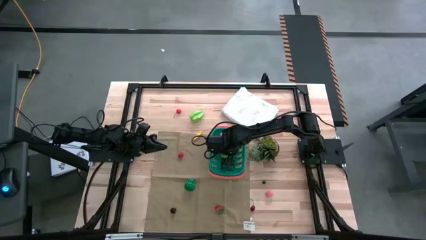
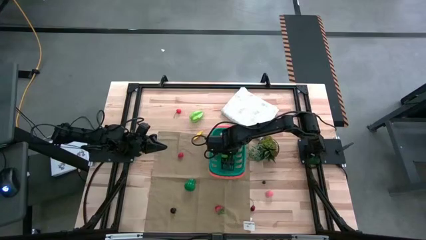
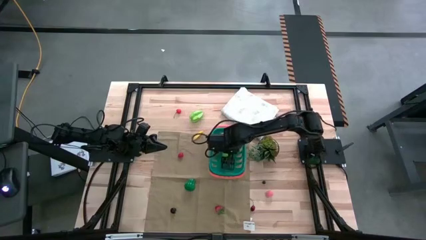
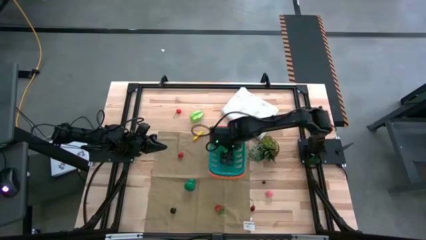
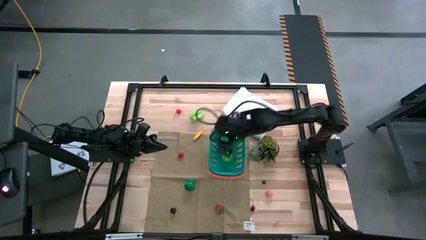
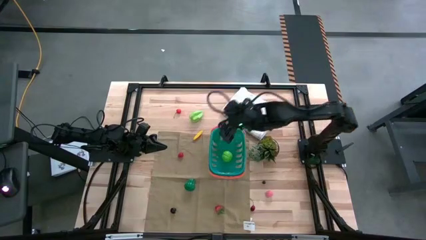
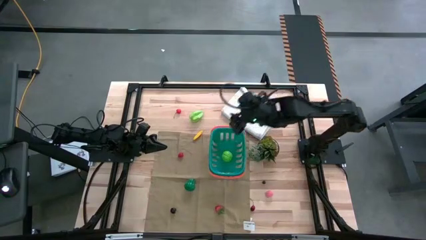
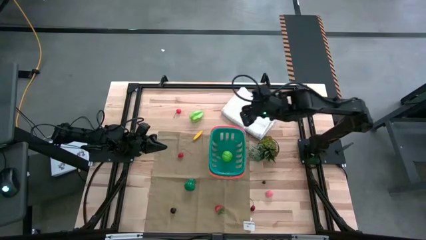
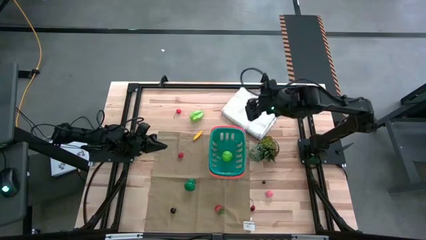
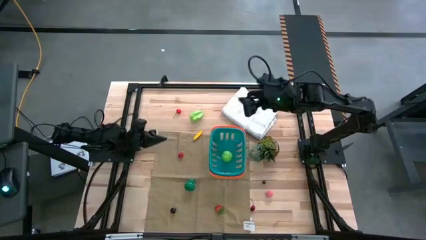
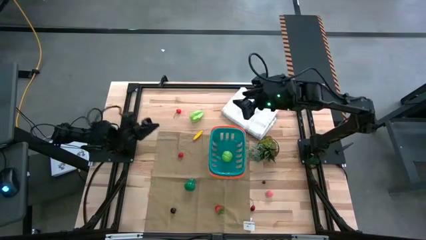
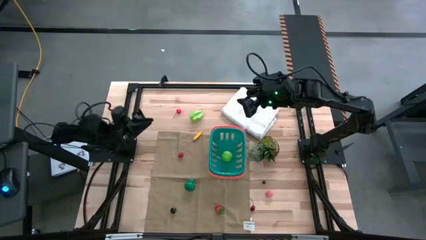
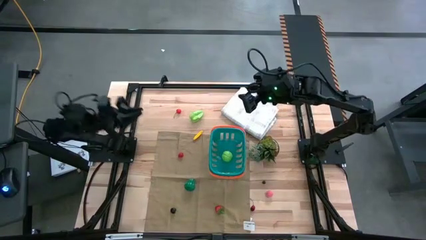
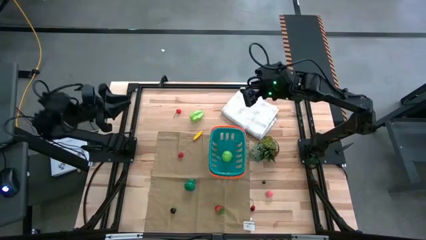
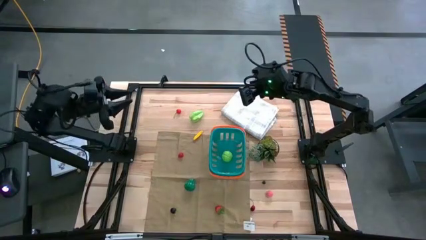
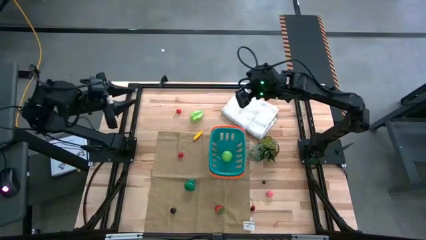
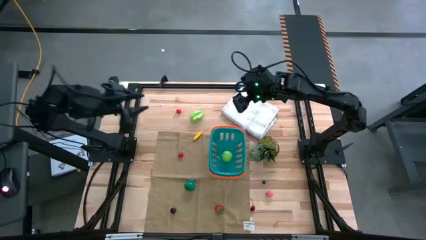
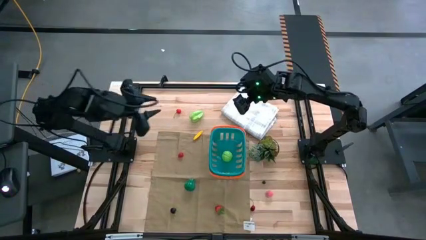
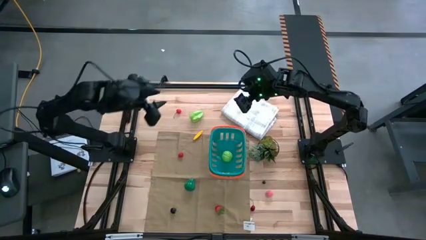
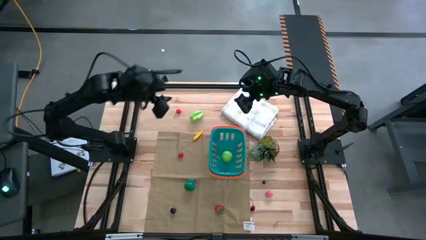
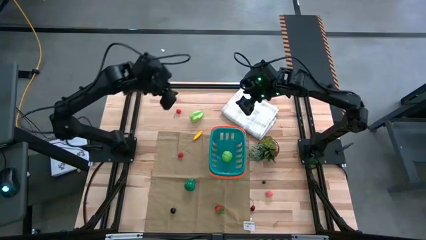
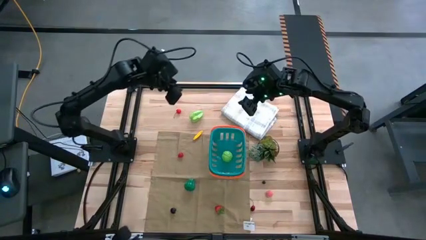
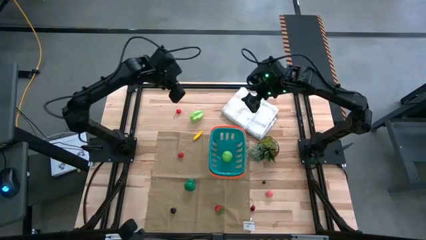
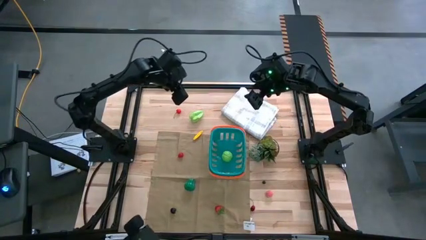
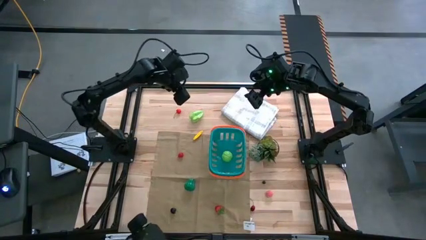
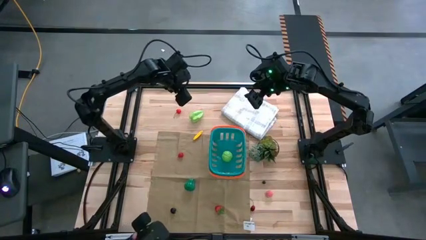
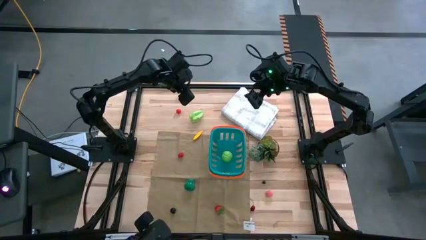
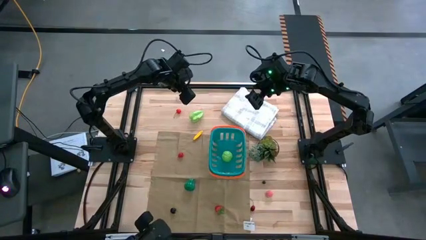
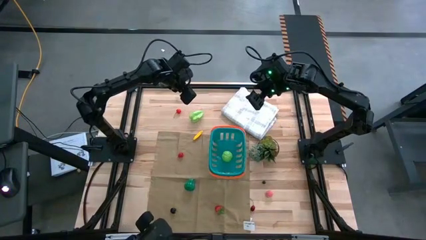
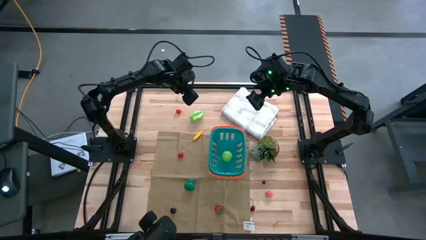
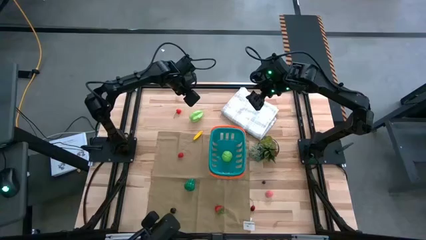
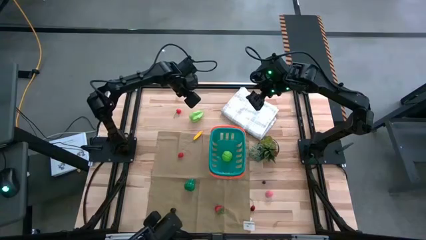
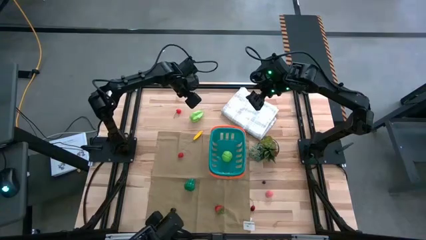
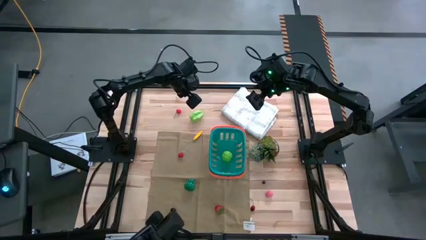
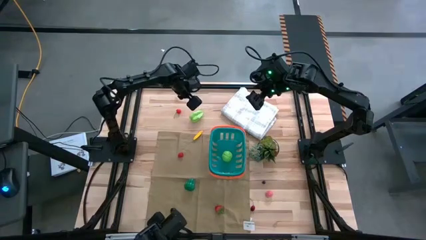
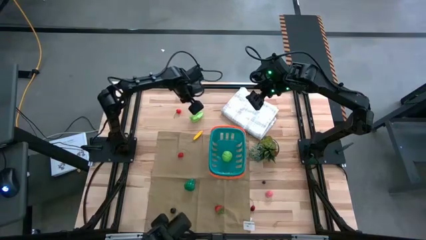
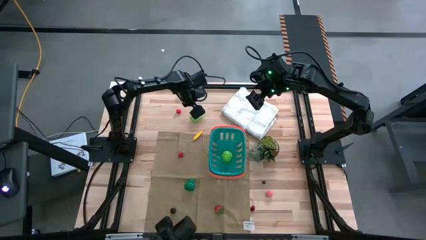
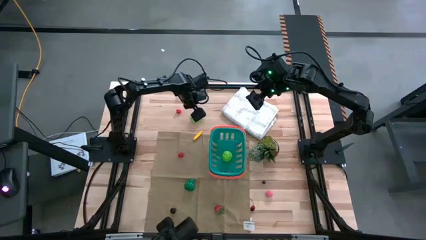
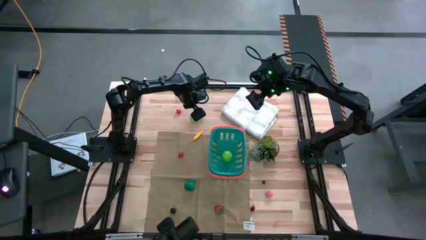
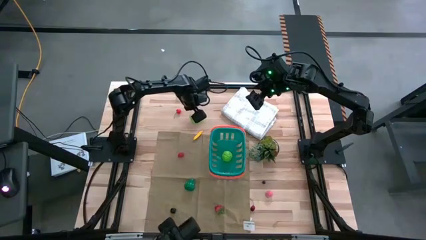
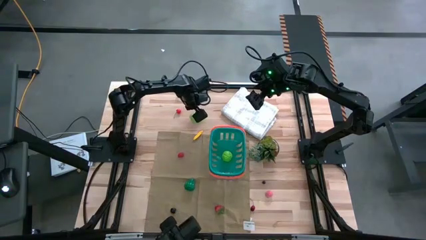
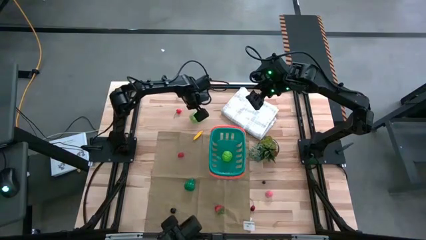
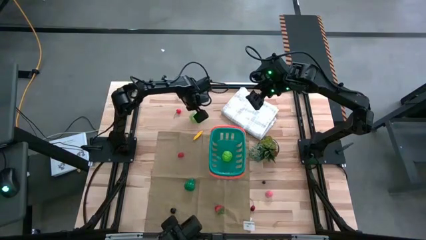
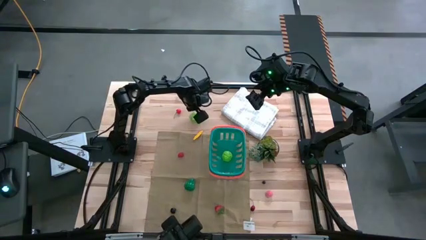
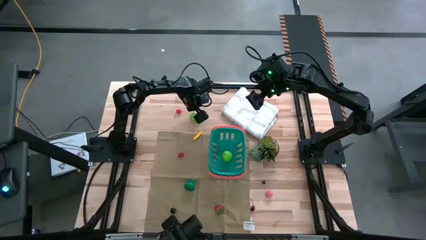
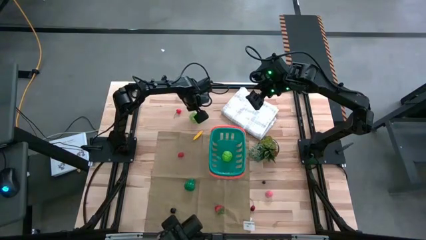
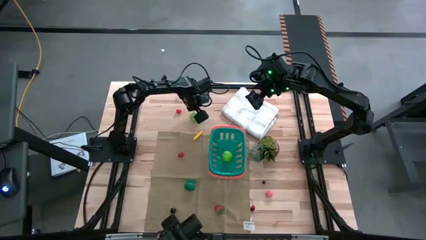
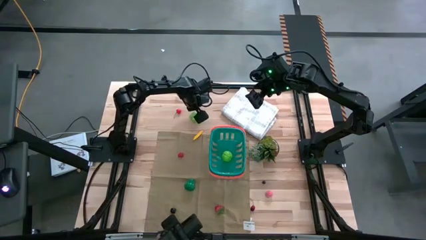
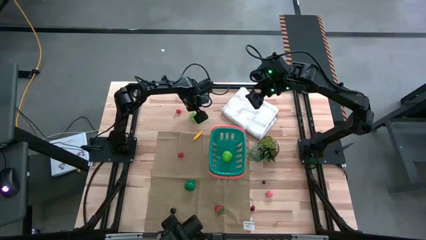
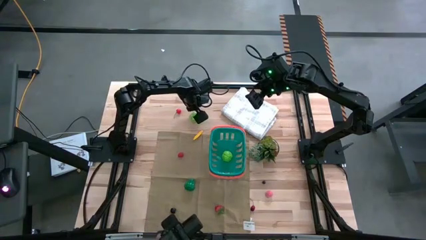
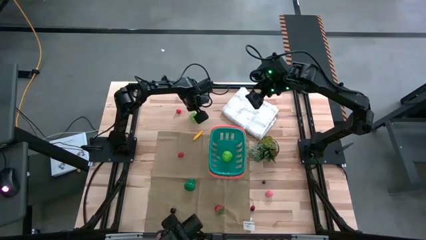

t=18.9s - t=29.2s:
Task: Pick and placing Produce into tupperware
Put the green starfruit into the blue basket
